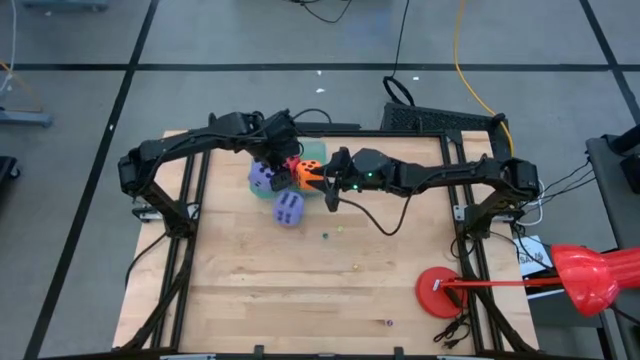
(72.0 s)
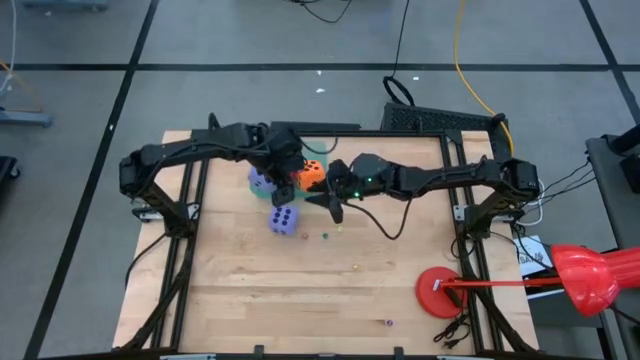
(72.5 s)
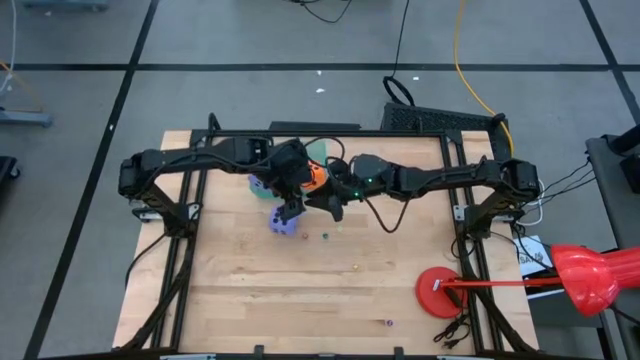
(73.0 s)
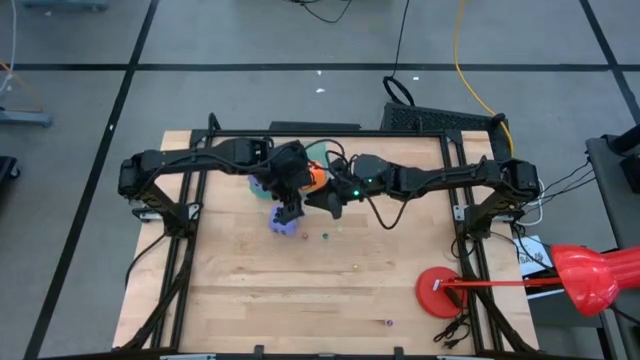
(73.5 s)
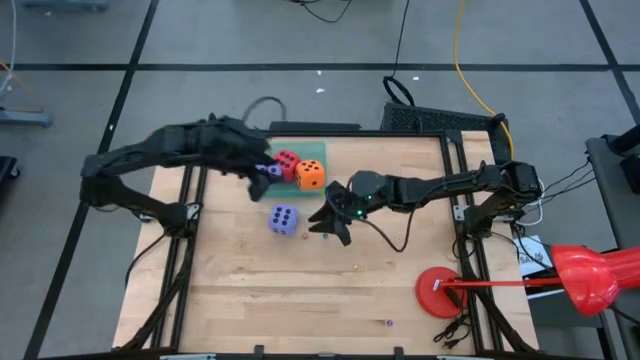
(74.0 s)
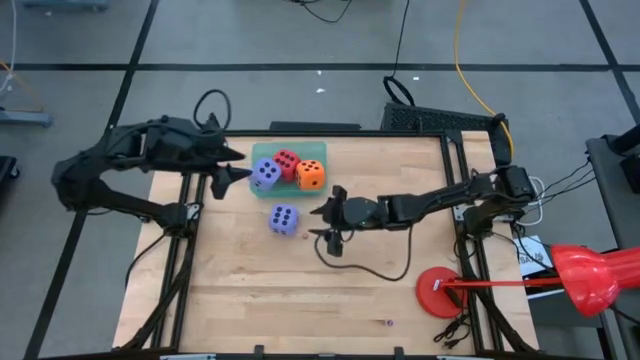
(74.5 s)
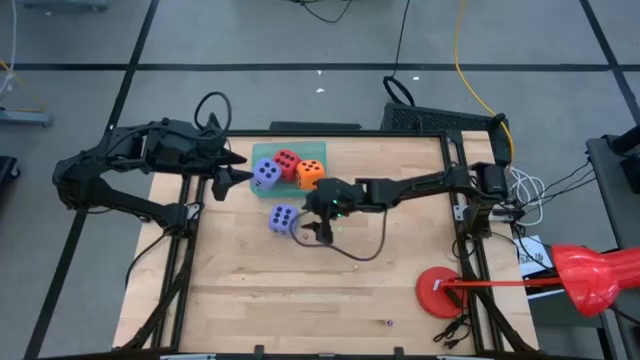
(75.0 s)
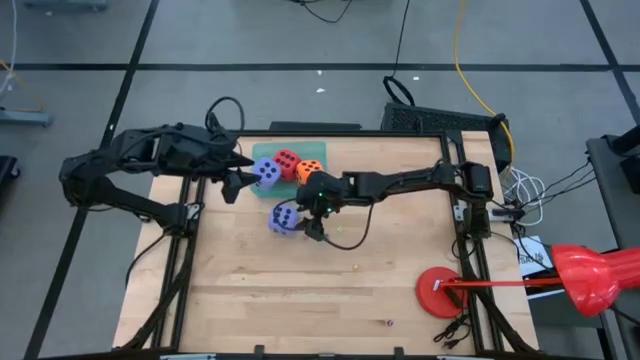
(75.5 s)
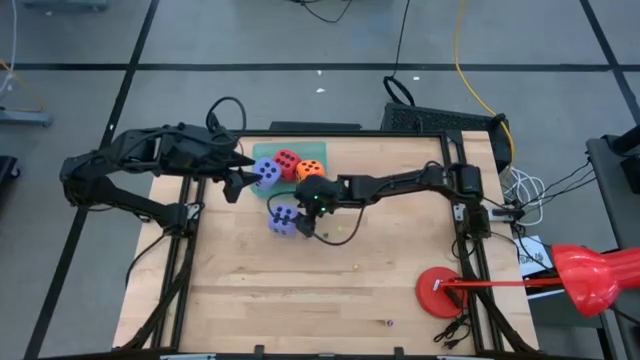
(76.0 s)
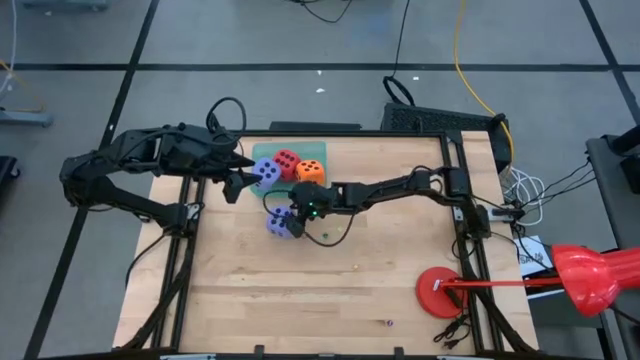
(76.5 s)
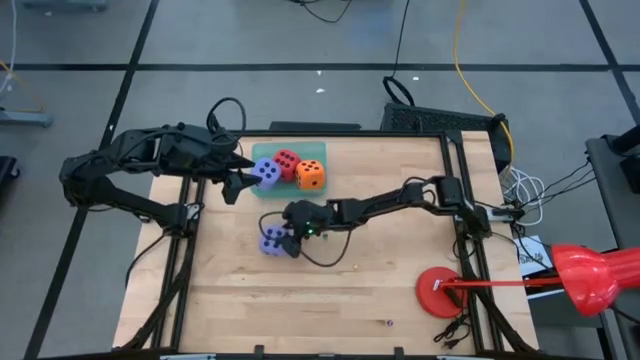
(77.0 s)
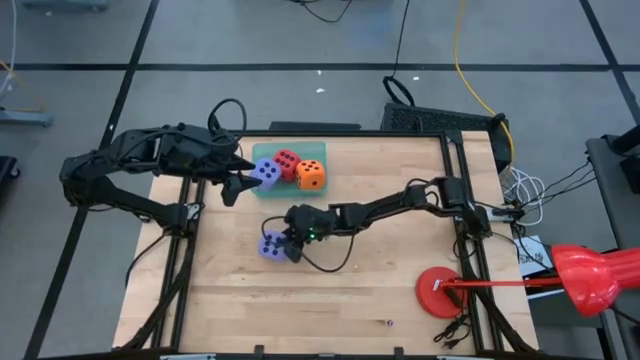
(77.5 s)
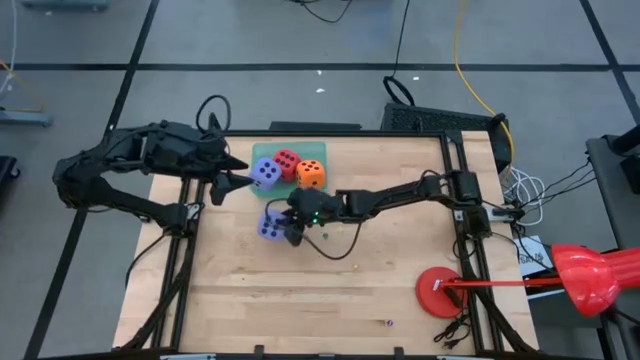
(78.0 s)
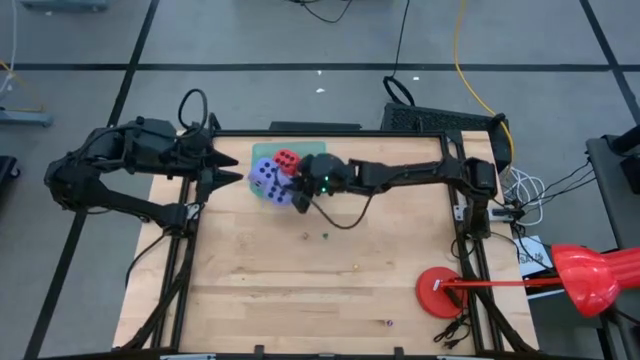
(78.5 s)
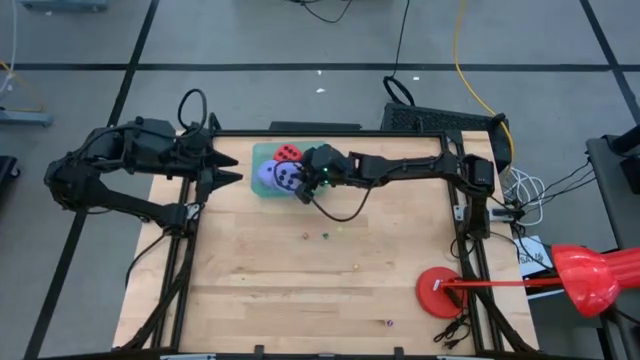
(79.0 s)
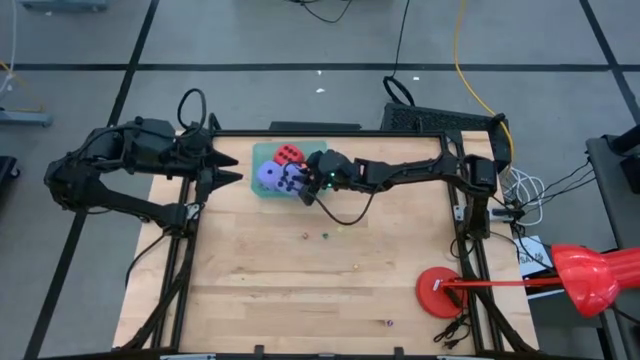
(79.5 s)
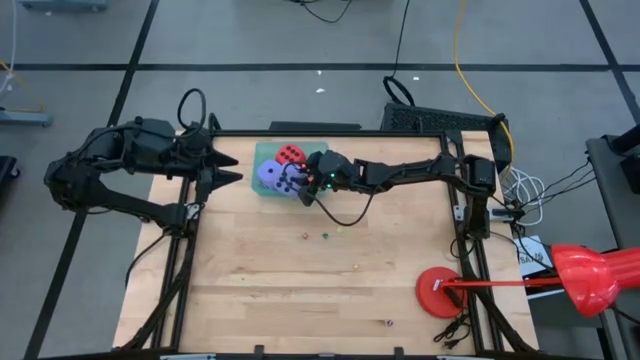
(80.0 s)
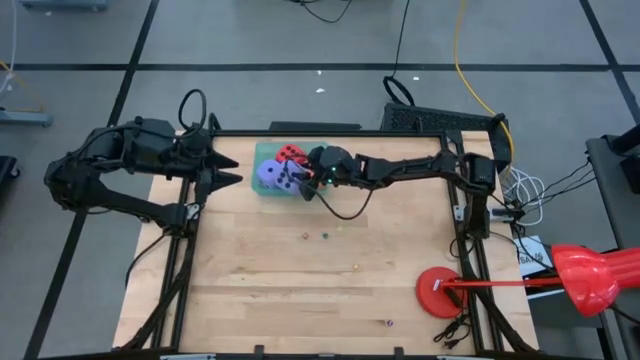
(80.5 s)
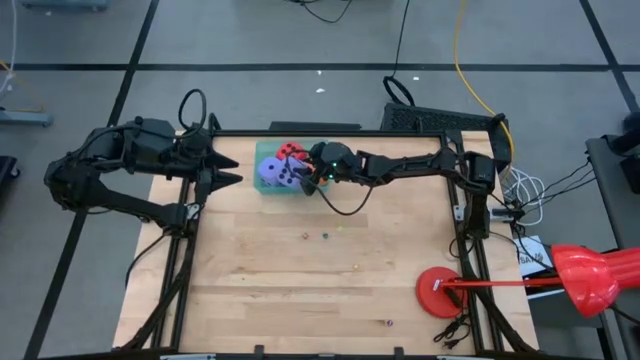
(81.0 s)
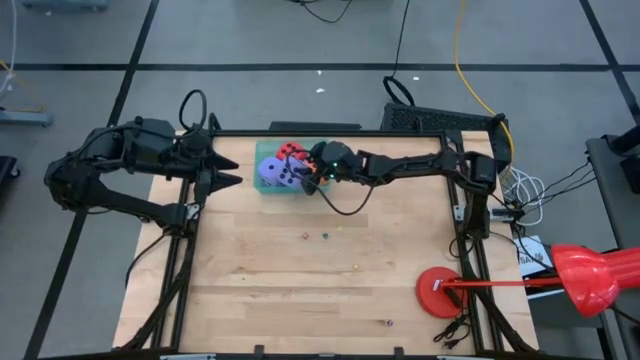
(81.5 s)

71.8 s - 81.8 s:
Task: Pick & Place Dice
Put the large purple dice into the green bin

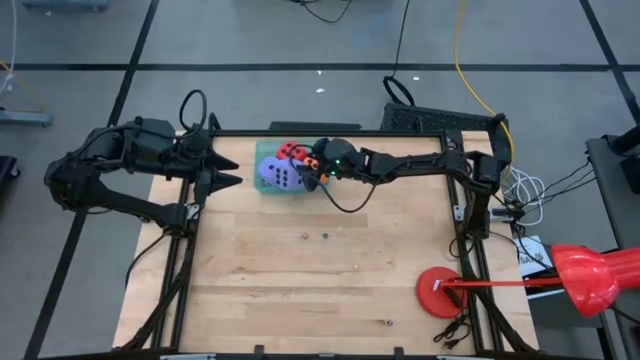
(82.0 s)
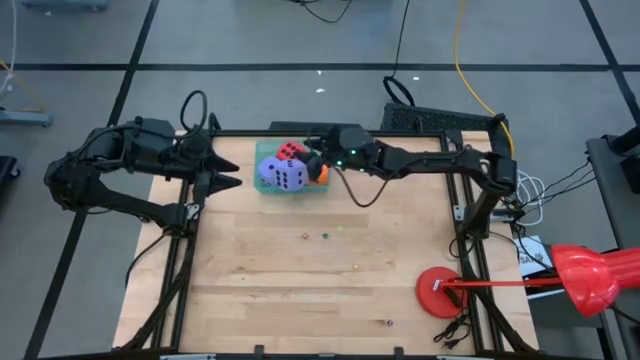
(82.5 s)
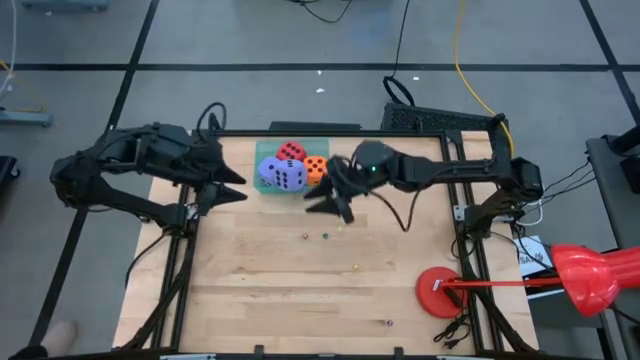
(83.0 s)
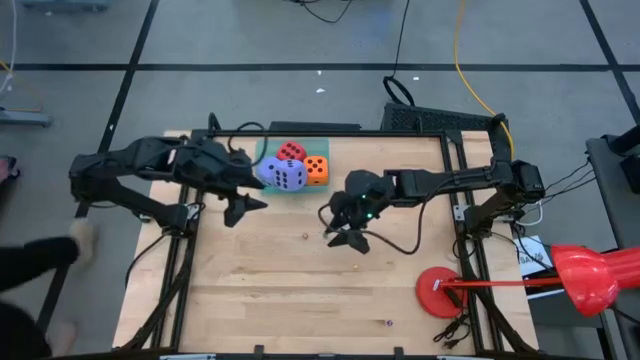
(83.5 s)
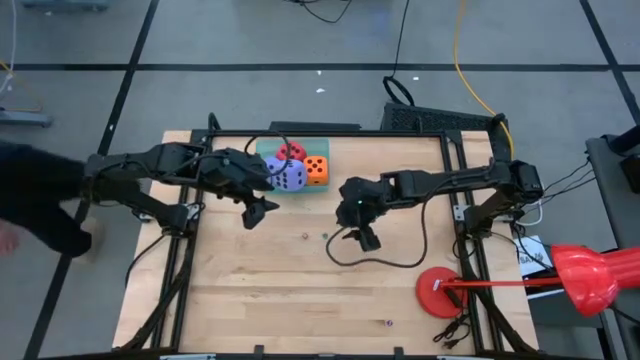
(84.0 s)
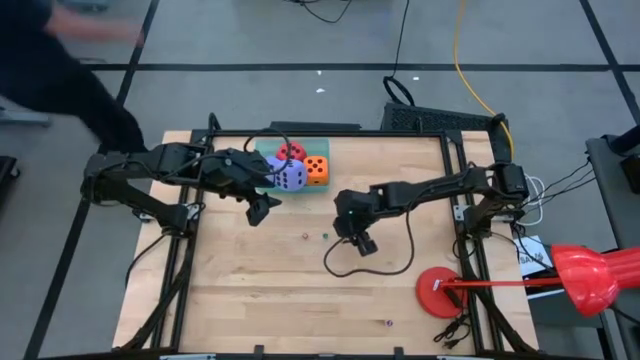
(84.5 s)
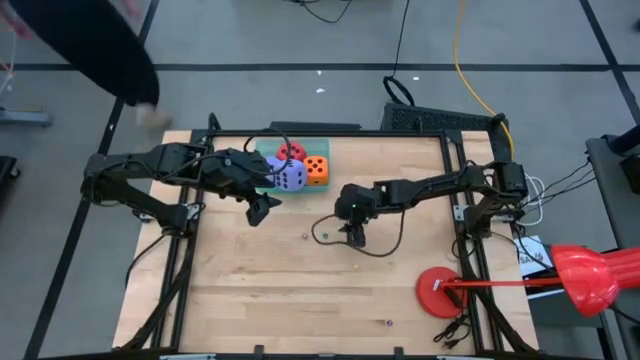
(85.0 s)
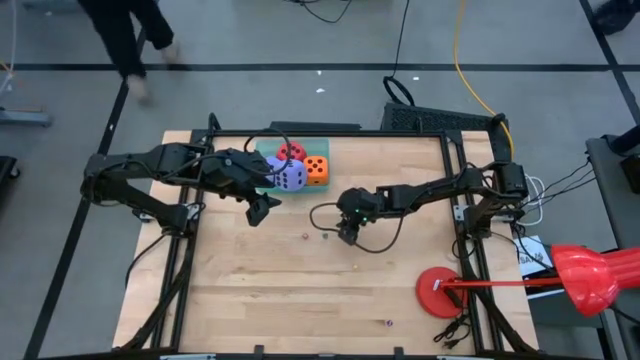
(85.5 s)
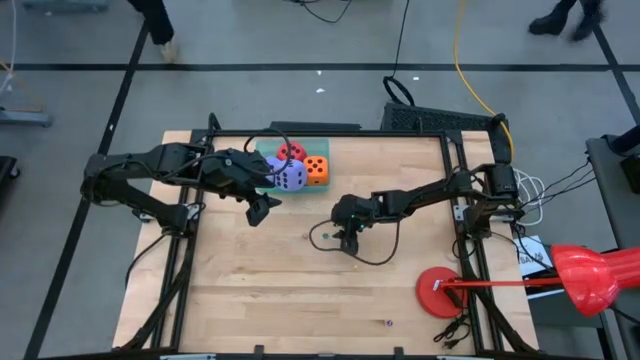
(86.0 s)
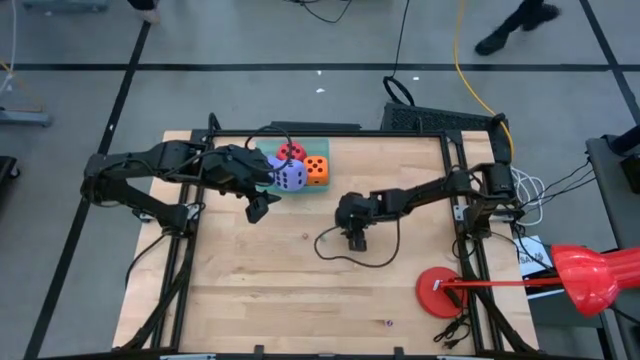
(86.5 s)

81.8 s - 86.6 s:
Put the small light green dice into the green bin

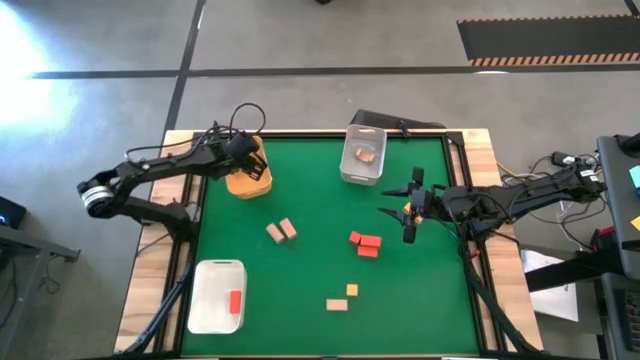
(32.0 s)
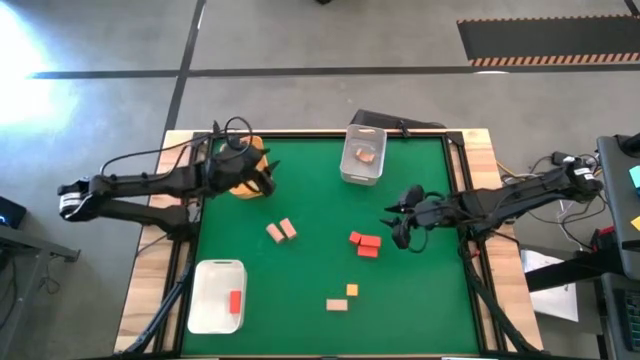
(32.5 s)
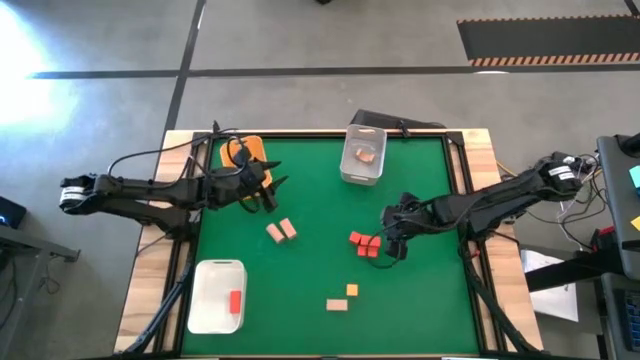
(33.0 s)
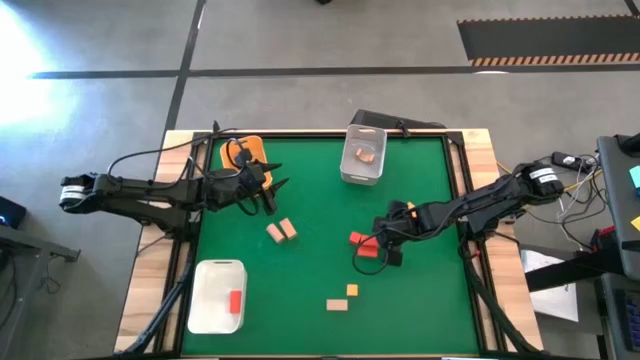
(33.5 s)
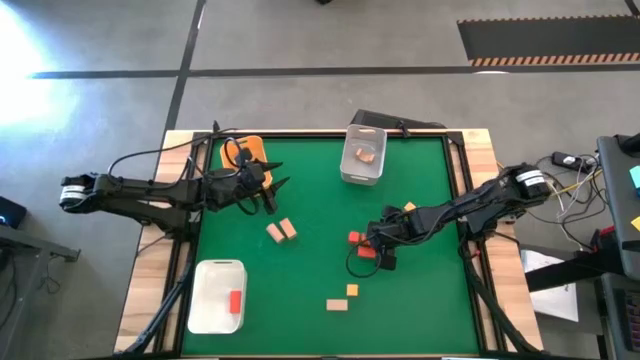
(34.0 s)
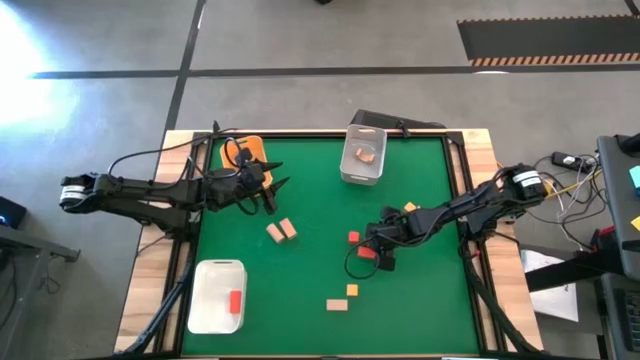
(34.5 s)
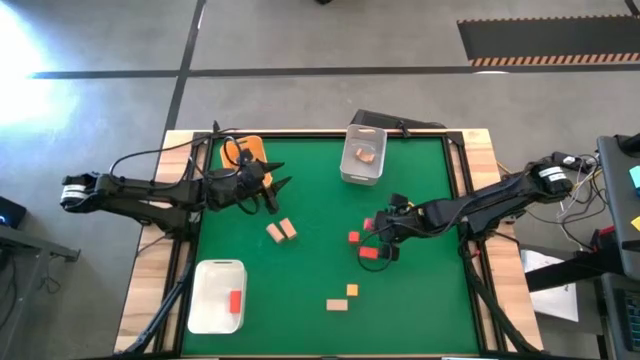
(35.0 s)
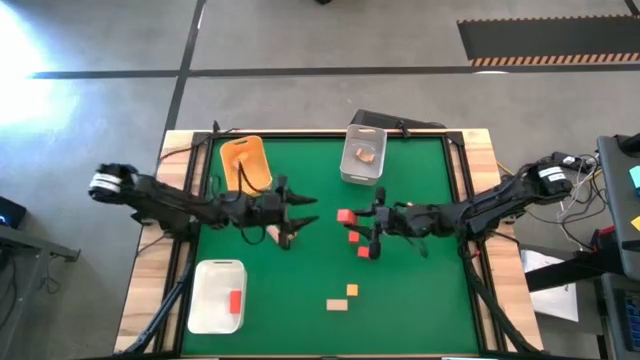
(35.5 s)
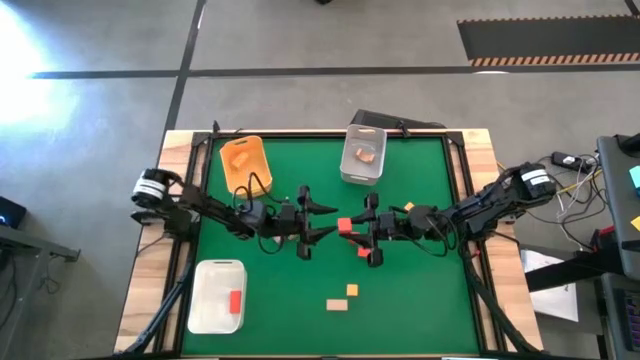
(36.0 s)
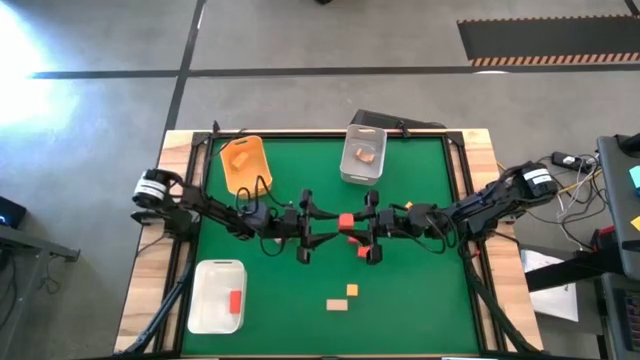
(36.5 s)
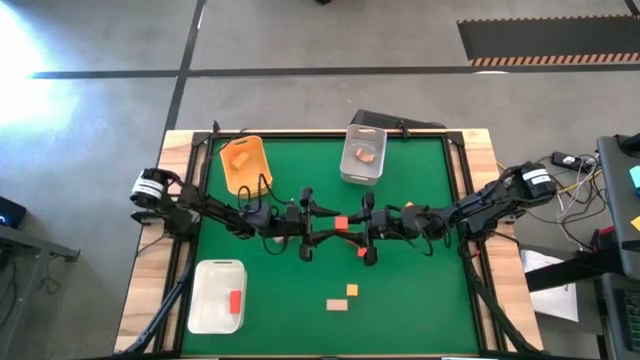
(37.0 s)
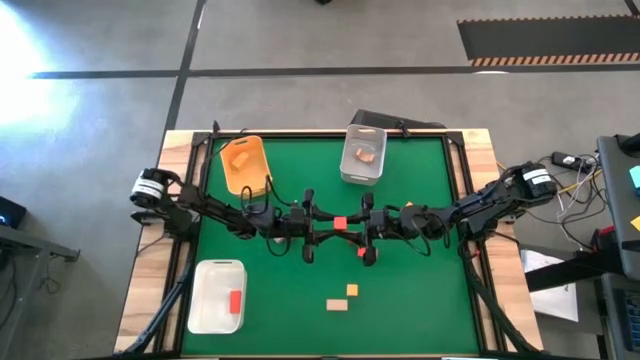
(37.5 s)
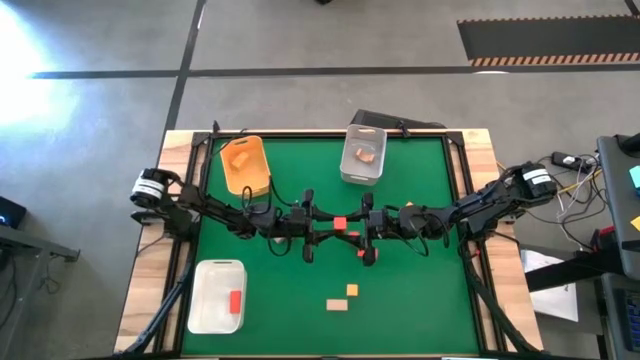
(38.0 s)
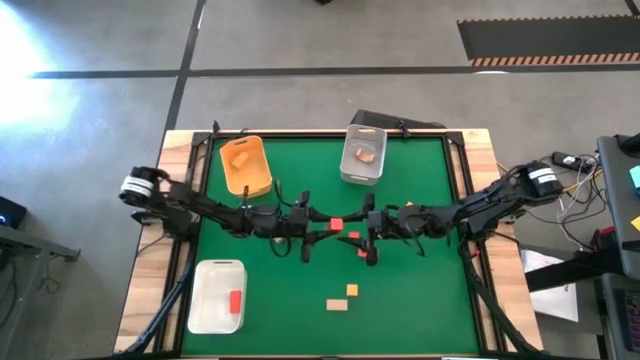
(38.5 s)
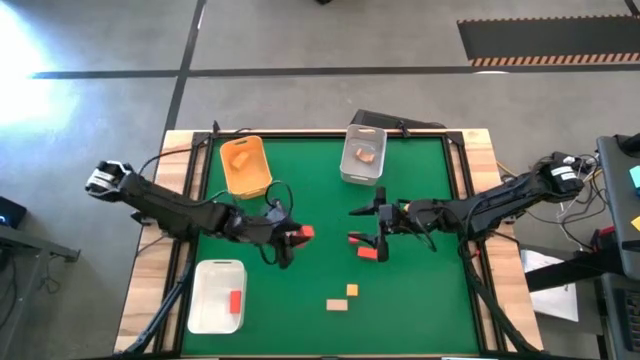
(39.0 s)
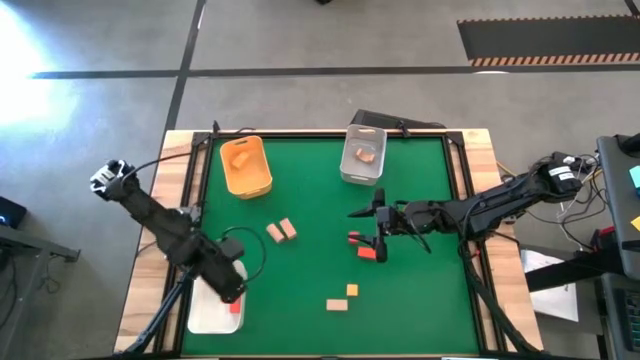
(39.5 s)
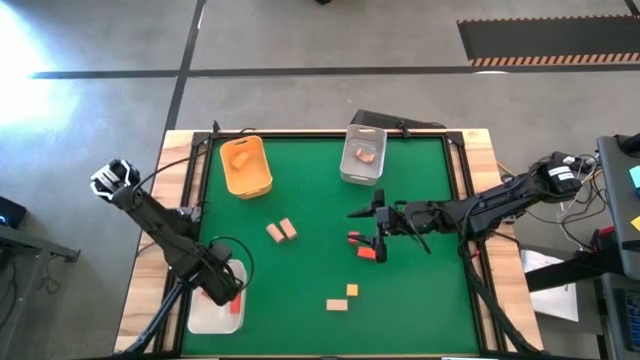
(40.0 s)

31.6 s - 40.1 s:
Task: Sort & place blocks by color
Put the orange block into the white bin
